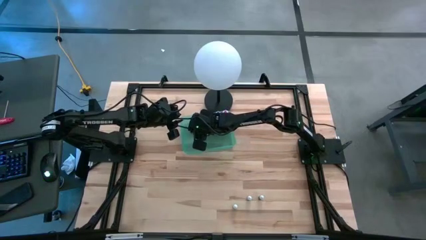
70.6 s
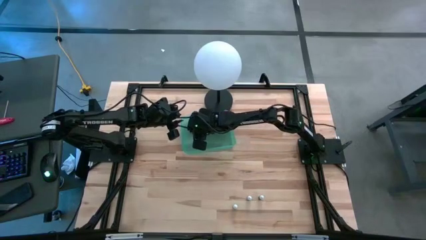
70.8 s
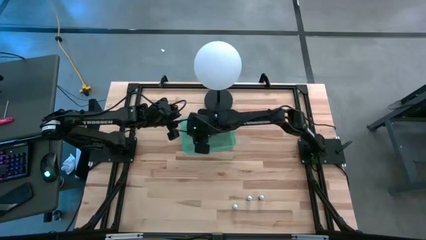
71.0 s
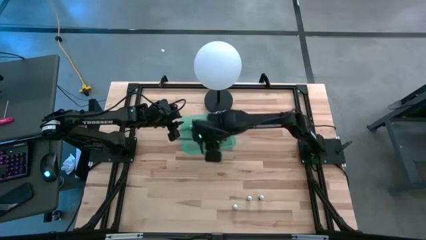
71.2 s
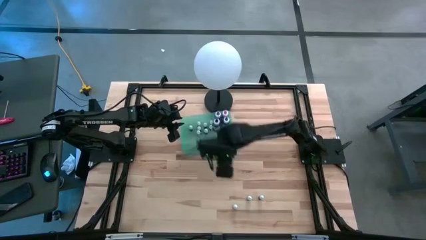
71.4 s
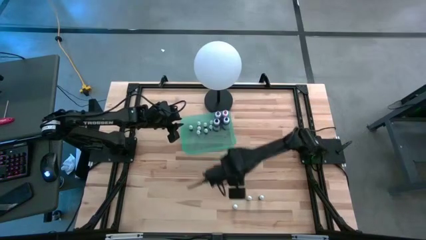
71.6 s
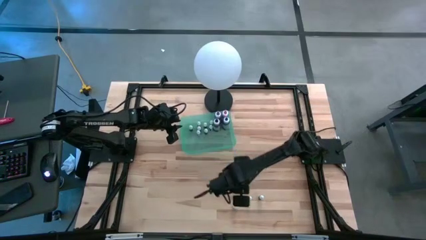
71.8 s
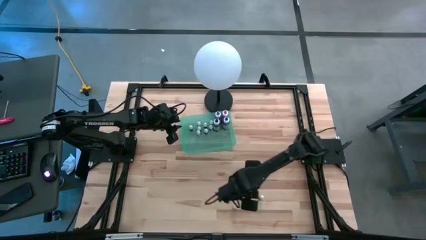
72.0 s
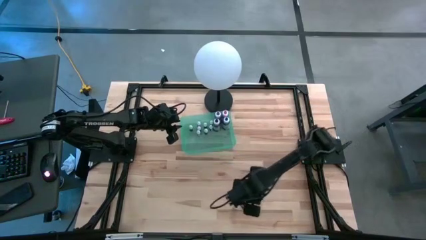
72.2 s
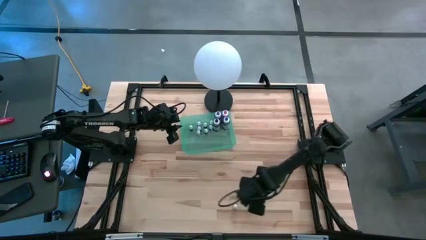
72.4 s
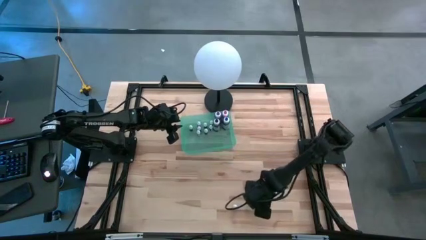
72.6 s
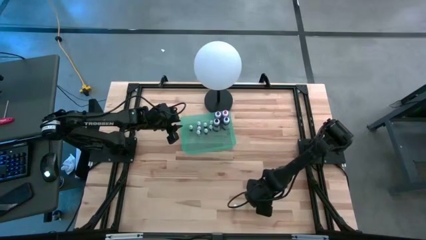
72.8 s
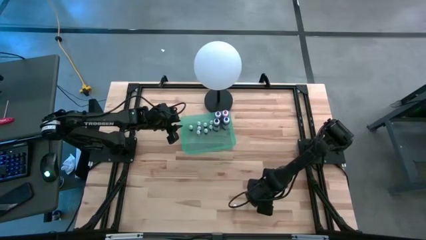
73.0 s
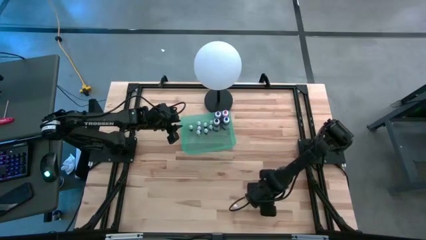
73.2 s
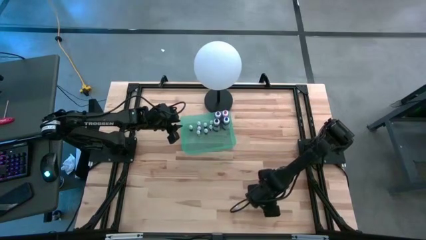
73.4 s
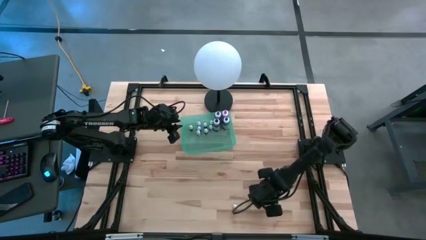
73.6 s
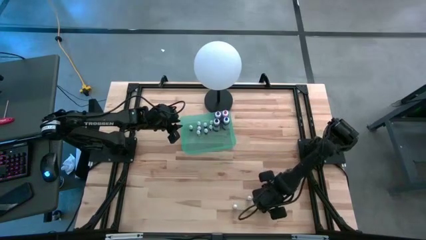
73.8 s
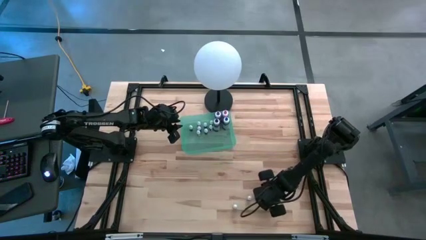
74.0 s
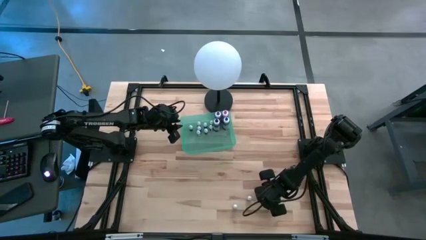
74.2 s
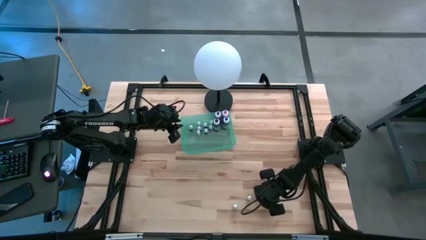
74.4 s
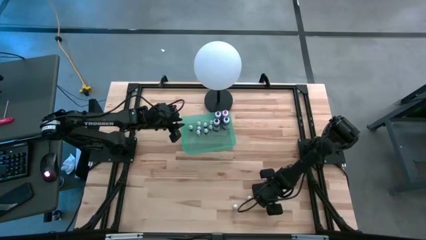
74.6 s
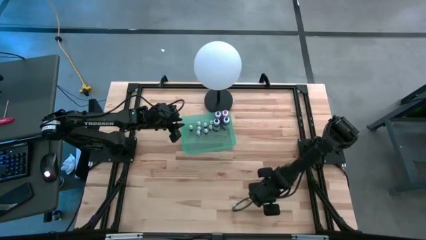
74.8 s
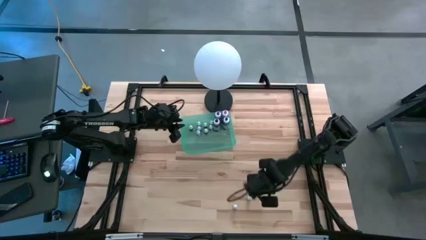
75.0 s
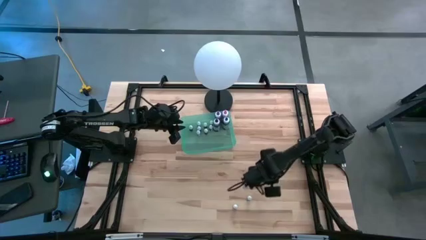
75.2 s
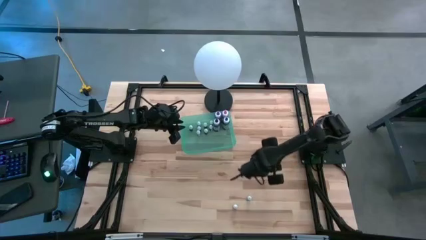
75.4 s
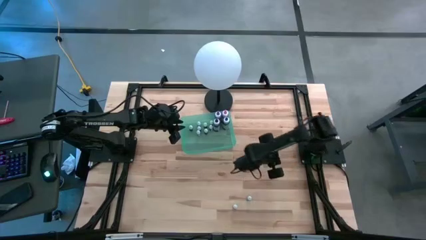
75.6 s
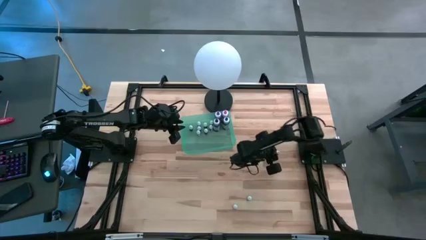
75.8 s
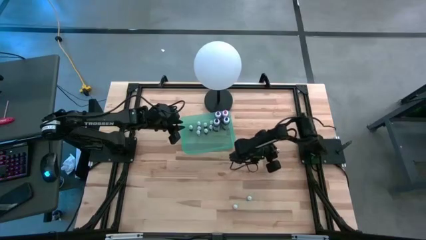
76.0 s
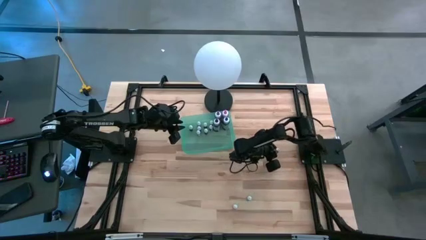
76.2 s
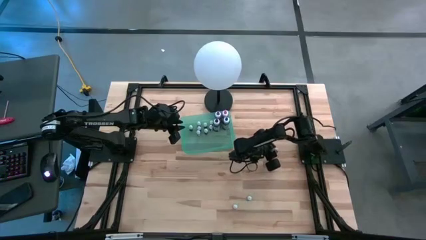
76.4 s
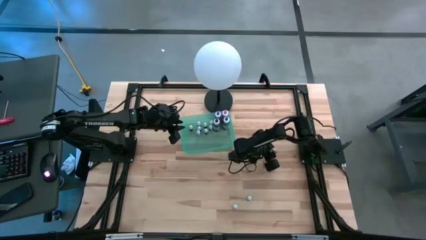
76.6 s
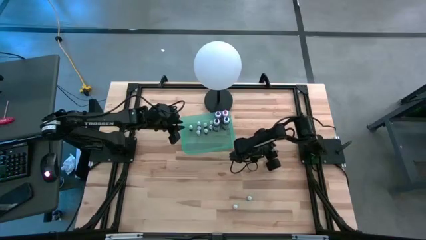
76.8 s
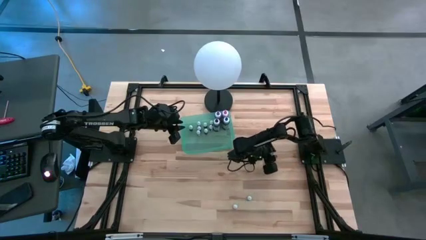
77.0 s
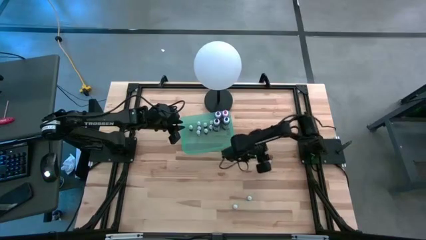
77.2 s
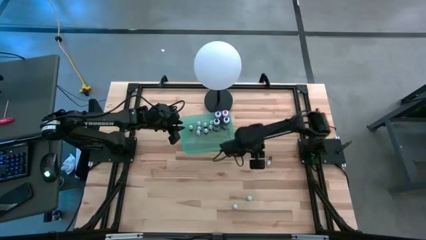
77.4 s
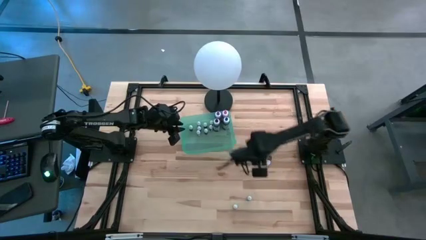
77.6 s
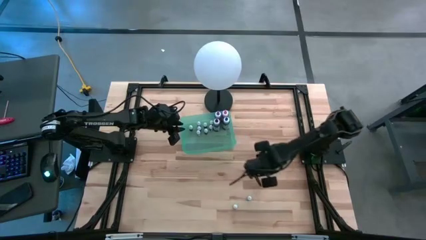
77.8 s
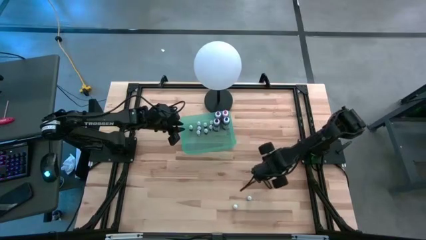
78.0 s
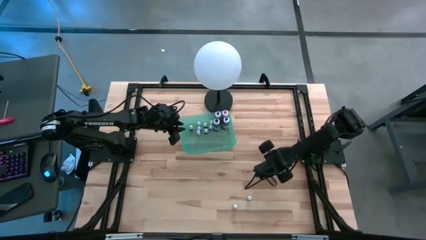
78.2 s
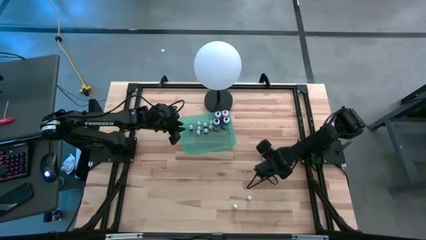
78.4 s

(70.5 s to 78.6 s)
Task: Pick & Place food coloring
Put the small purple food coloring bottle into the green bin

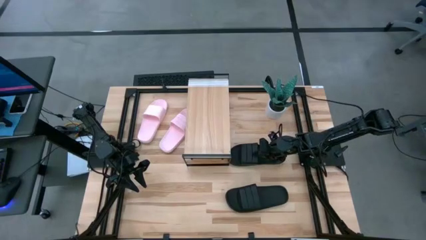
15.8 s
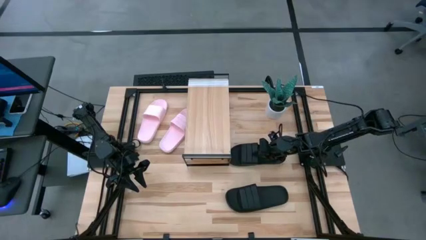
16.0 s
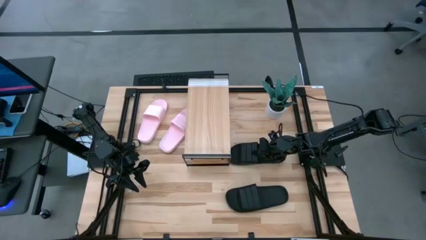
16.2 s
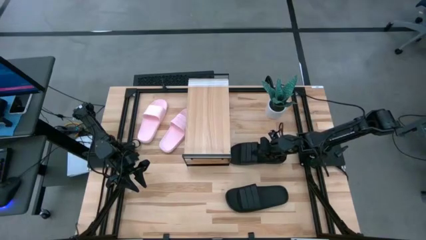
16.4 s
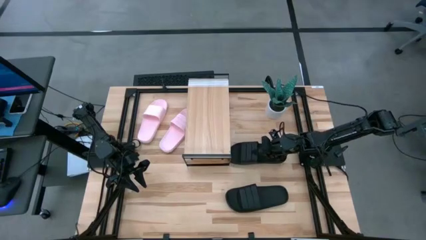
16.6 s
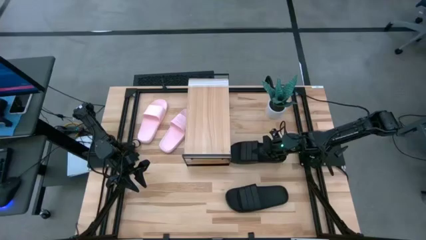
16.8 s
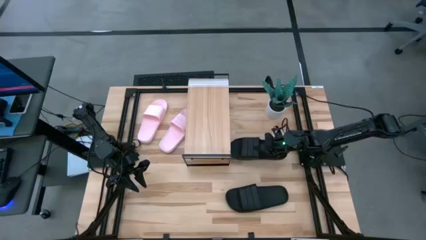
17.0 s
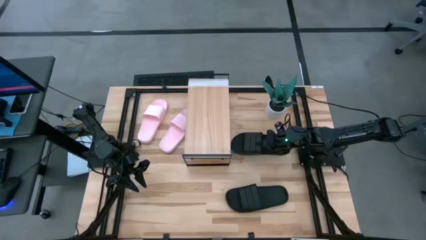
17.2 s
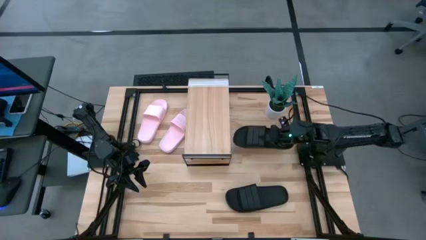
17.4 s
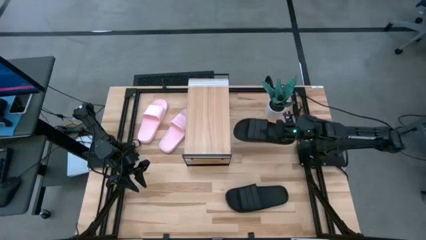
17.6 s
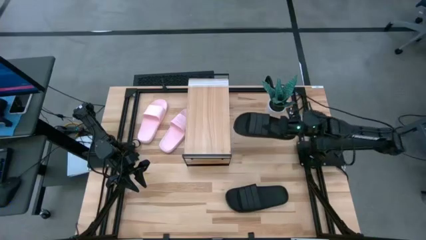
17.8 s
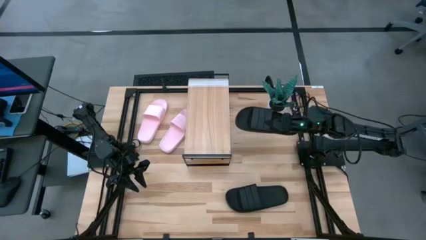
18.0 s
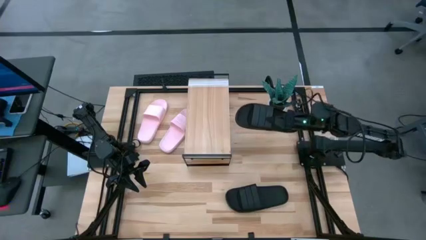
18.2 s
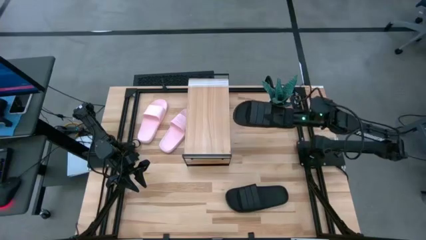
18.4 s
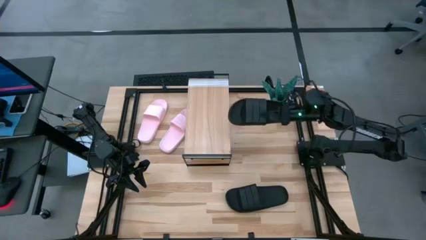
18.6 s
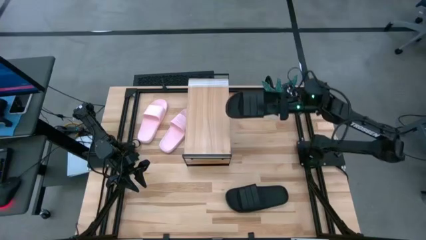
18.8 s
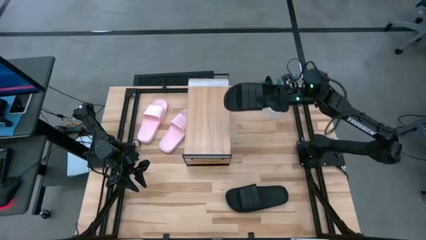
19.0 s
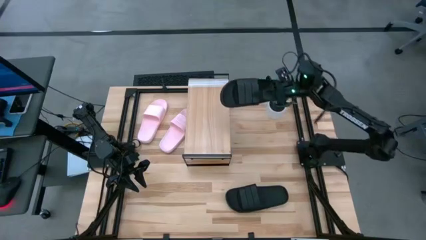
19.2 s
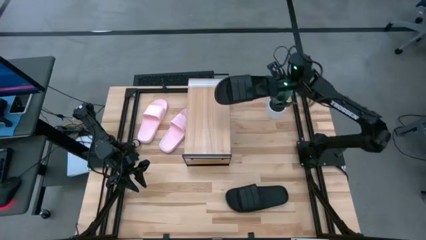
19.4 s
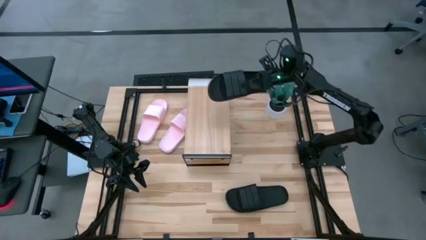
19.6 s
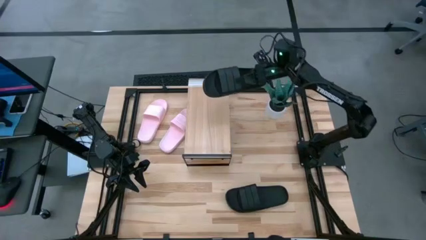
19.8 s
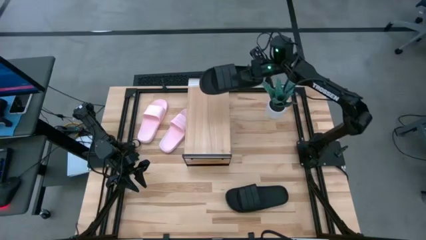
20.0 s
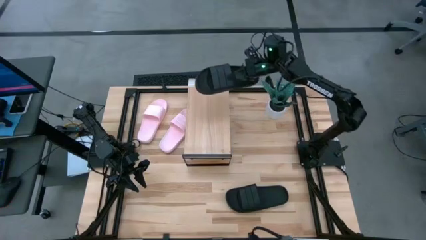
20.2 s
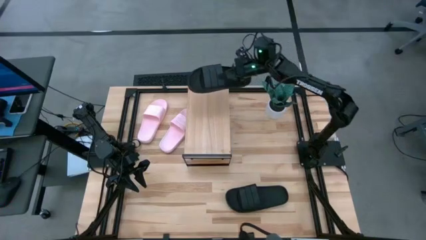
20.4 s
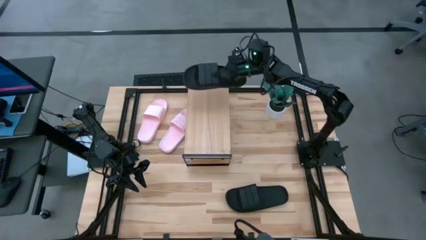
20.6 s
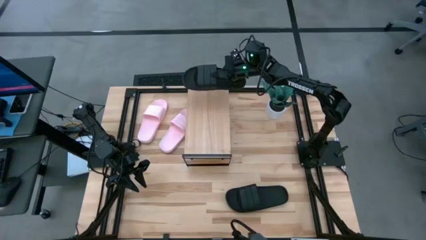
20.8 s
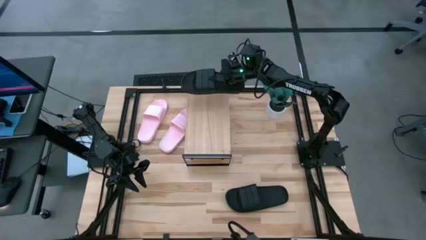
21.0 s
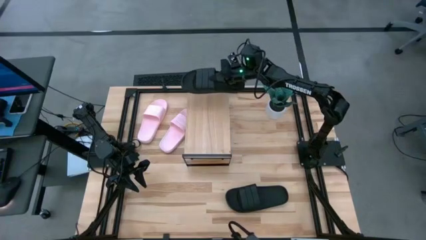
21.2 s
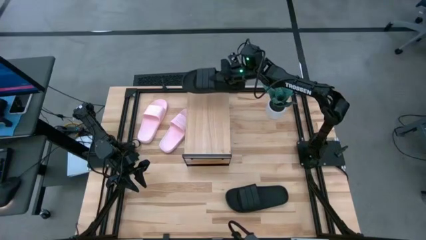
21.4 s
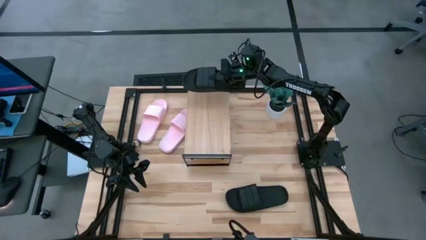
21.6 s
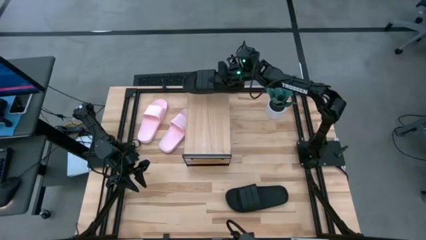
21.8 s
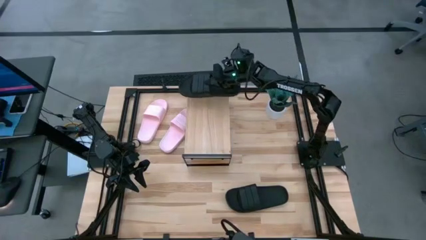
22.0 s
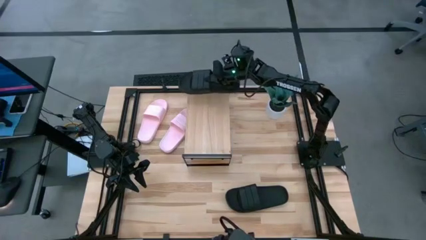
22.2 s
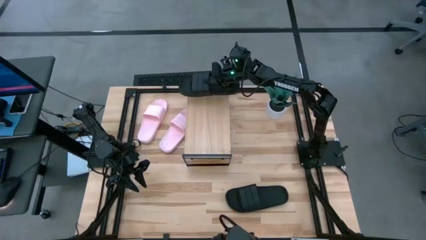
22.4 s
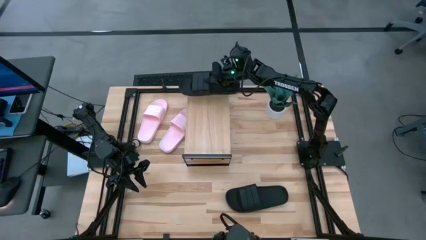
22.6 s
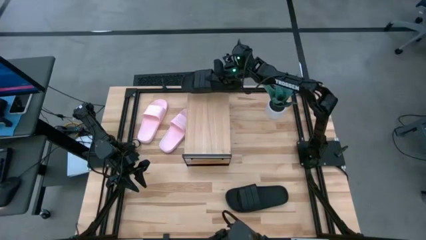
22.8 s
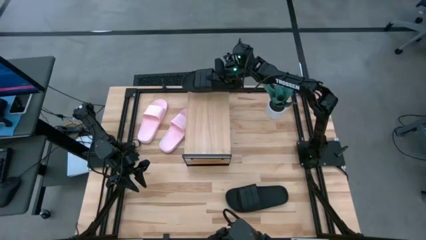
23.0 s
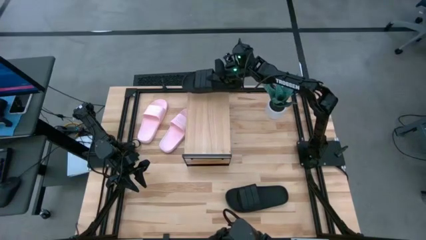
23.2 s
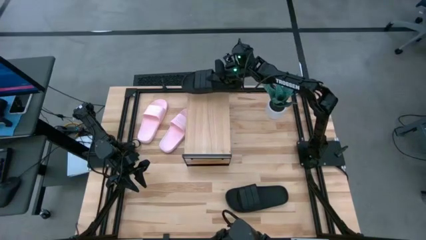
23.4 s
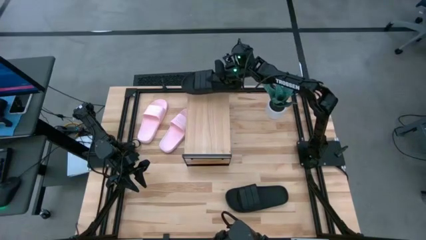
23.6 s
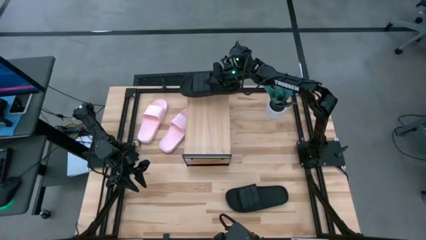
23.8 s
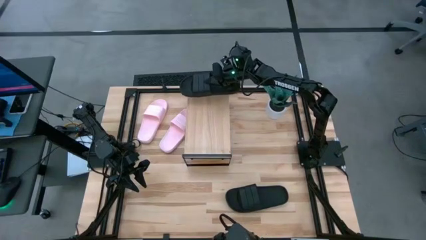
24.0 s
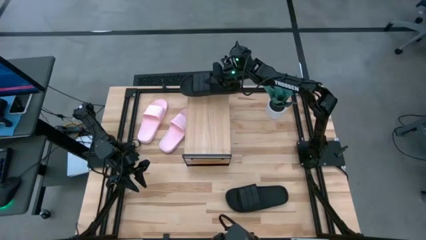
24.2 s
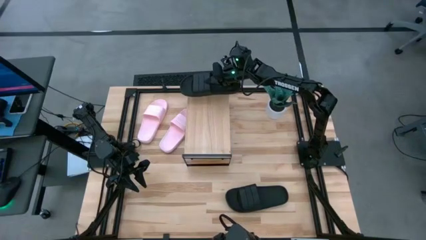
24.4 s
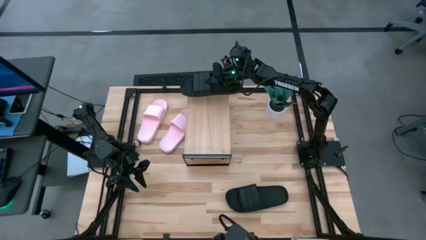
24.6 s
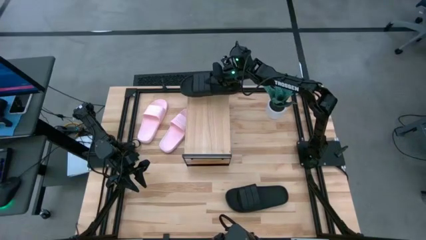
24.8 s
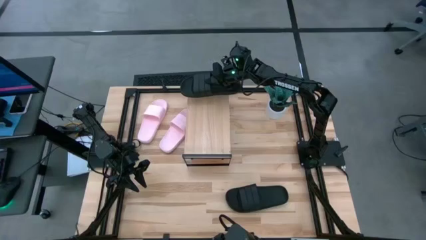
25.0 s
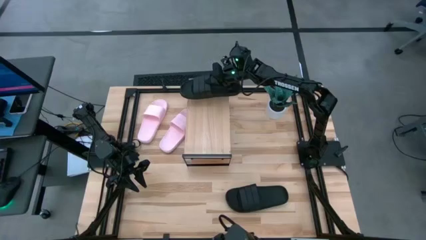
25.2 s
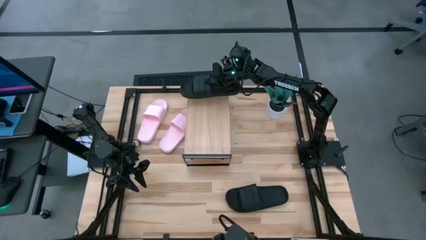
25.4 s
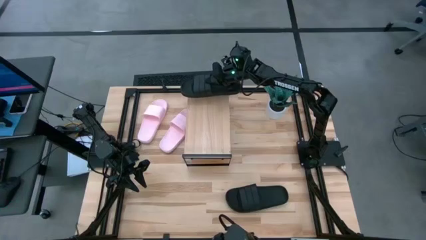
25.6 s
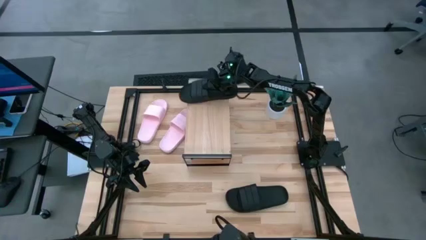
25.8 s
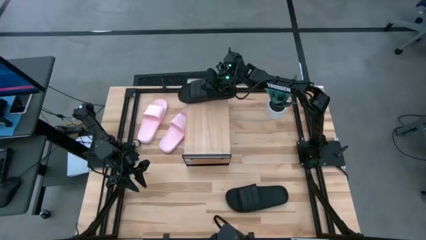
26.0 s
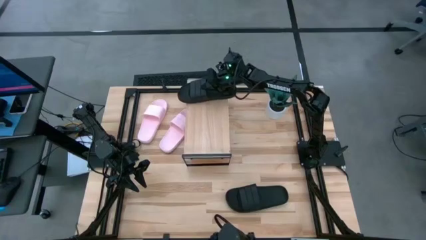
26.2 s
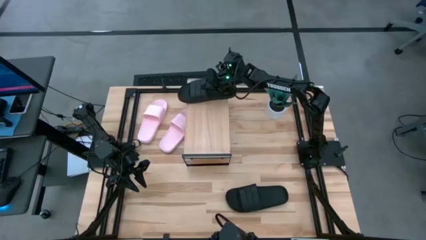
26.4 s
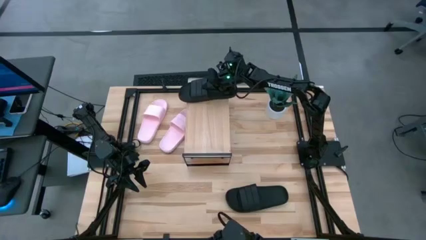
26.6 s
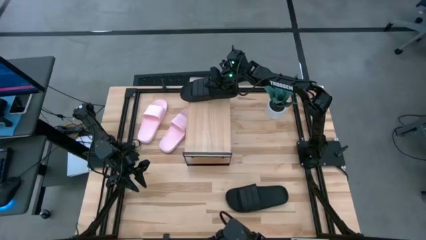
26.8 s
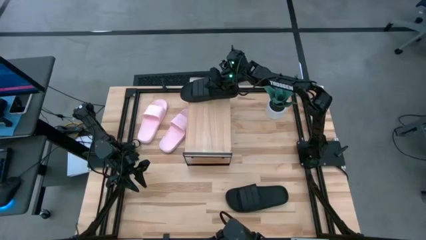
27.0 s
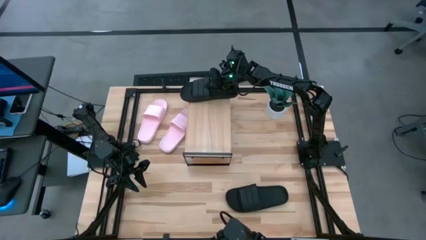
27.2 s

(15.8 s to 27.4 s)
Task: Pick and place slides into the shelf
Put the top black slide on the shelf
